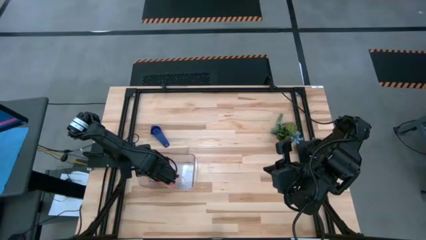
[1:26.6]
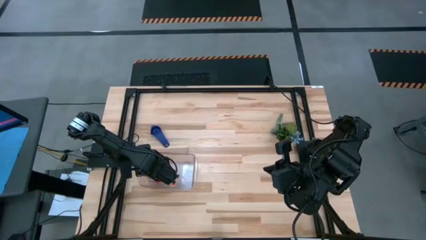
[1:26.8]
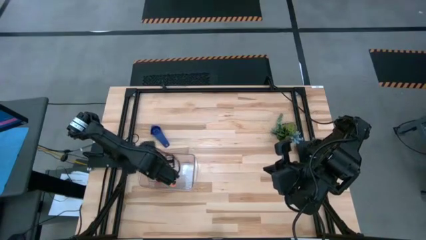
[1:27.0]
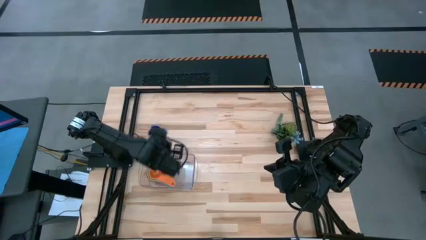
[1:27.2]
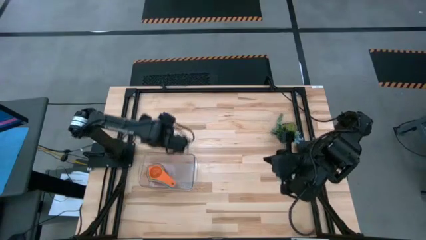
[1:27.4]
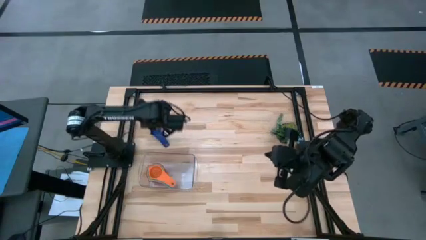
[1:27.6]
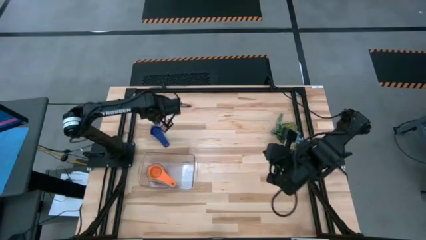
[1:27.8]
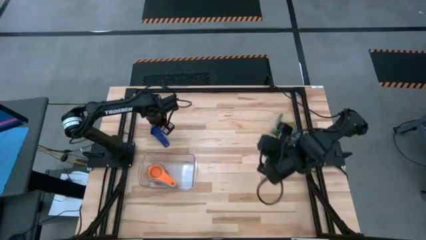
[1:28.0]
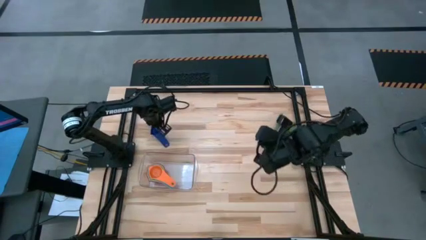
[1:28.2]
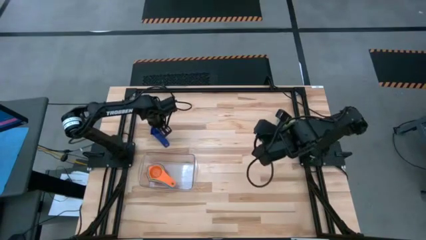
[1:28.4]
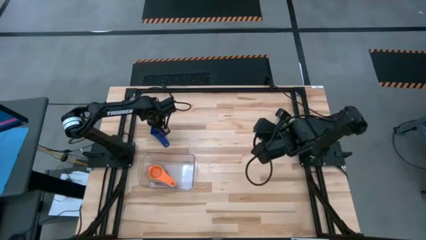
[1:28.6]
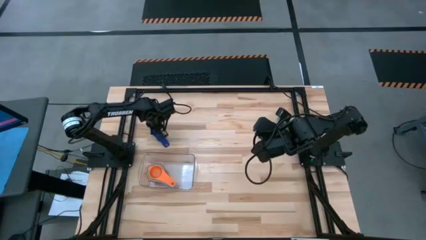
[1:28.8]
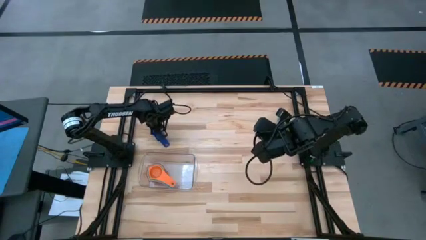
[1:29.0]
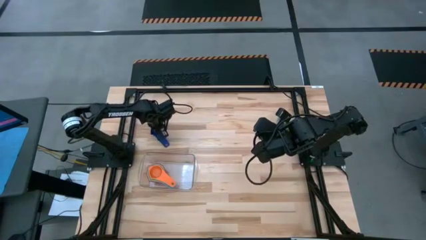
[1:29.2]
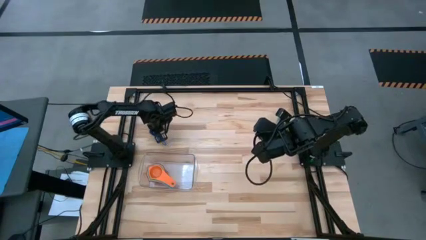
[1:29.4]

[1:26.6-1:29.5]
Task: Nest measuring cups in basket
Stack the dark blue measuring cup on the orange measuring cup in the transparent bin

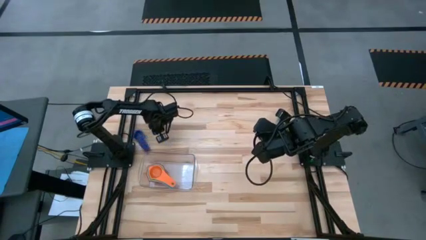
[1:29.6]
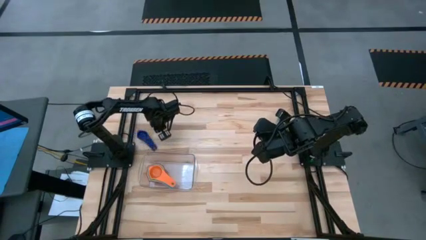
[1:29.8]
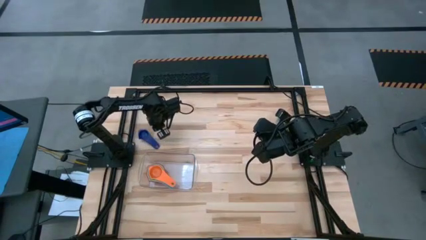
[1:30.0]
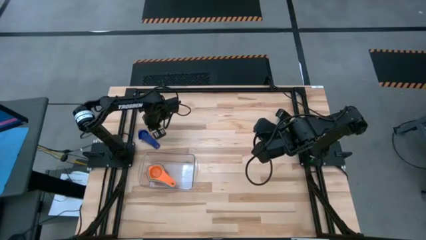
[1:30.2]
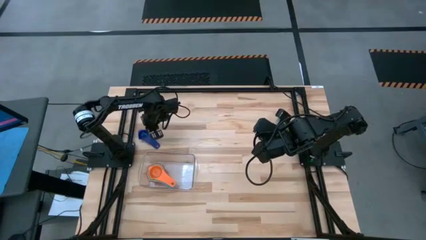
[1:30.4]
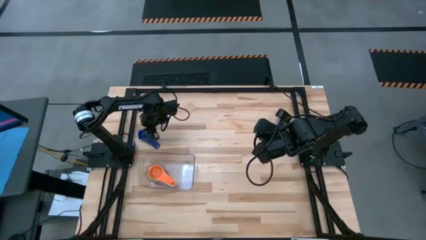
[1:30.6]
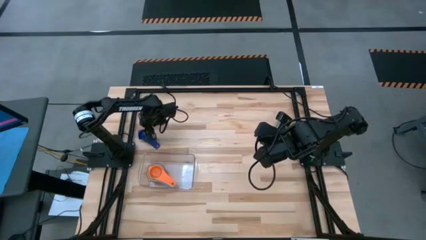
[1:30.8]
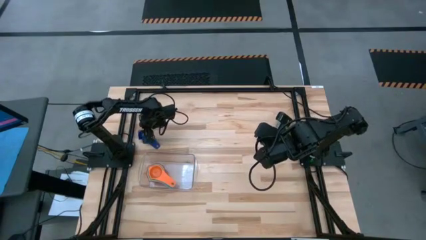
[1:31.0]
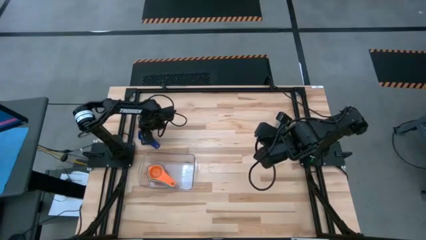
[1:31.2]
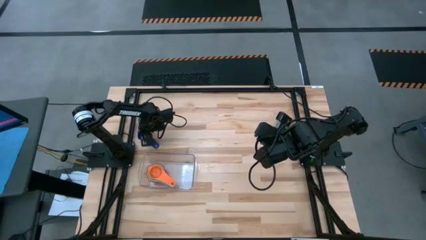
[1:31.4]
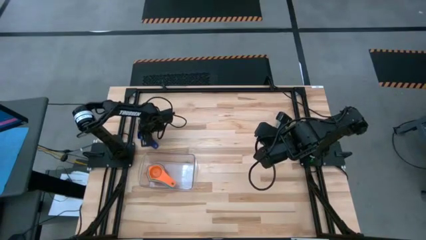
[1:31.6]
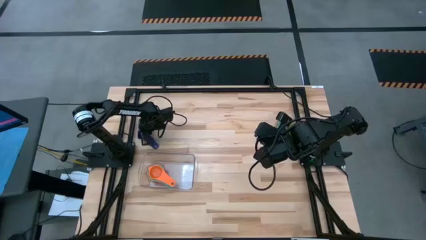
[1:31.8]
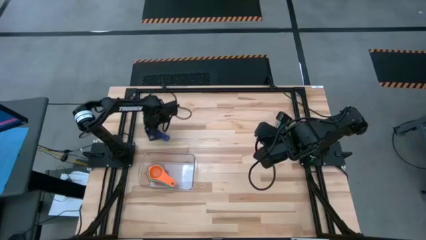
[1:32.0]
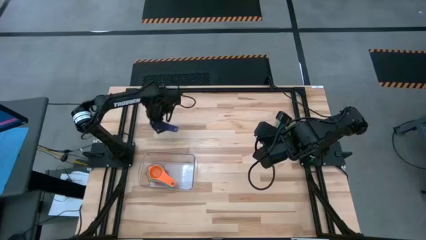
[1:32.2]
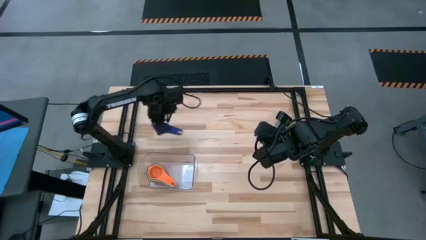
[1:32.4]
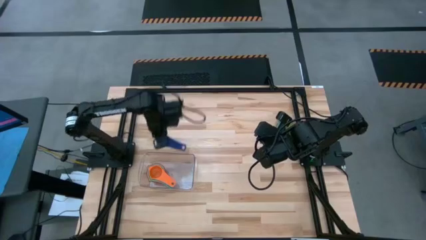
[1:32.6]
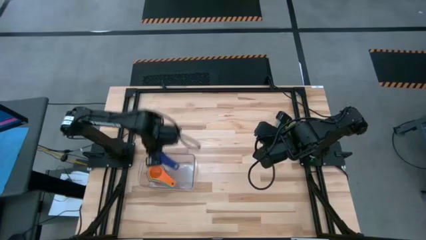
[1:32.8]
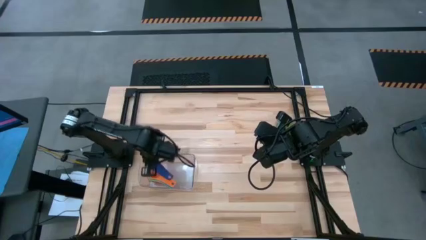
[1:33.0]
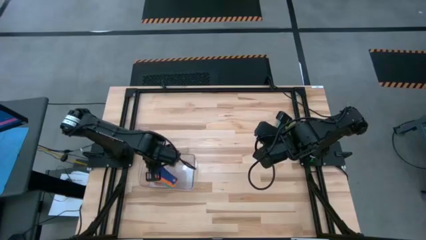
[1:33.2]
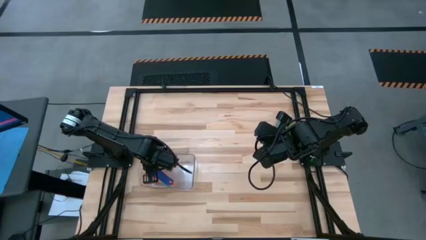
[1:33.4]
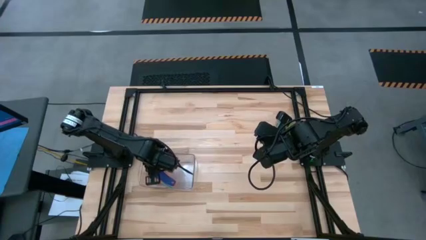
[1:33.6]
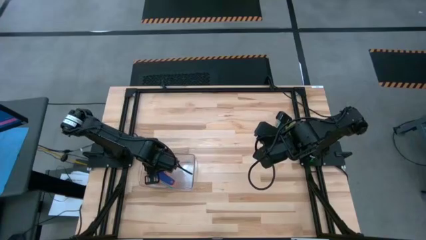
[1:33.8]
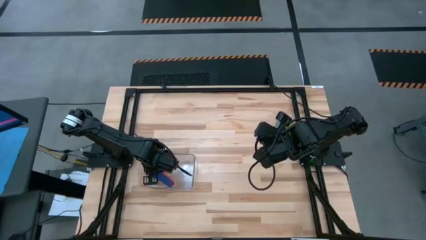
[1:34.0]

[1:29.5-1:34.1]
Stack the dark blue measuring cup on the orange measuring cup in the transparent bin

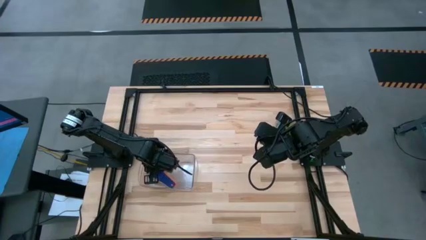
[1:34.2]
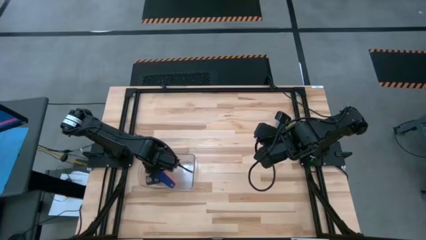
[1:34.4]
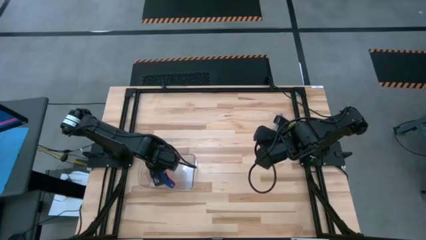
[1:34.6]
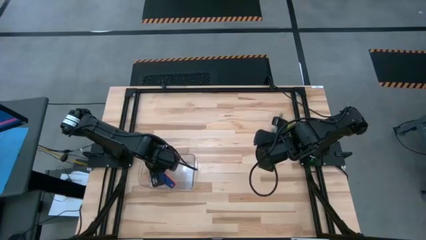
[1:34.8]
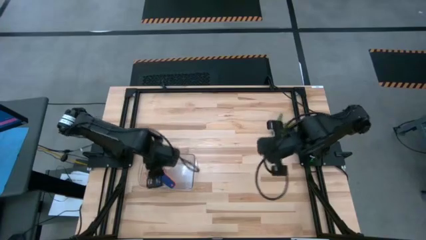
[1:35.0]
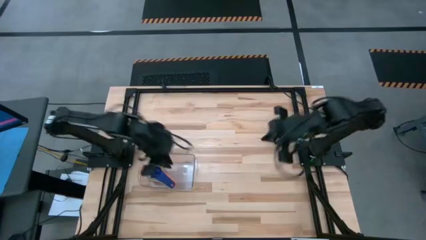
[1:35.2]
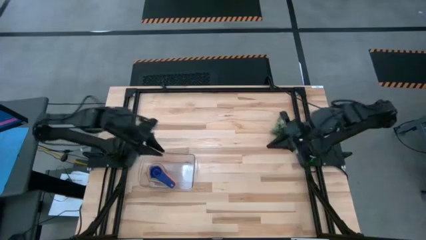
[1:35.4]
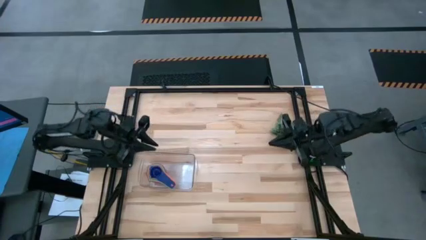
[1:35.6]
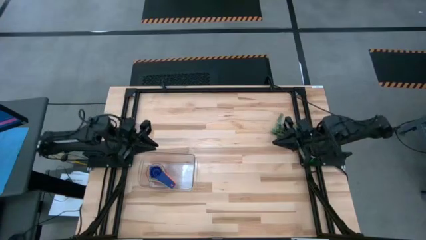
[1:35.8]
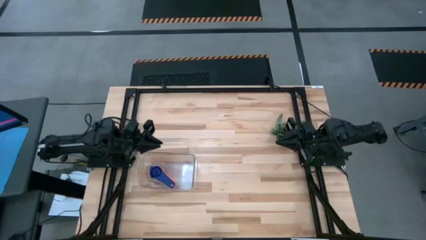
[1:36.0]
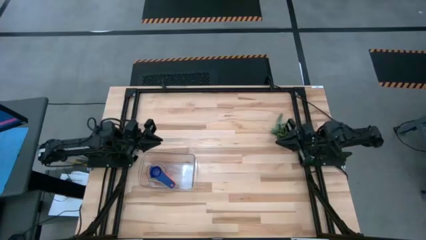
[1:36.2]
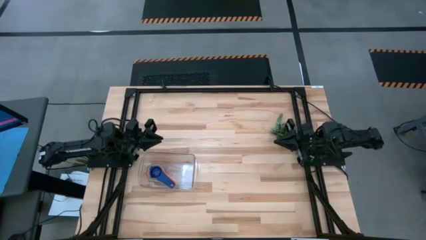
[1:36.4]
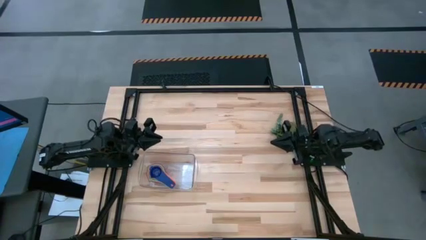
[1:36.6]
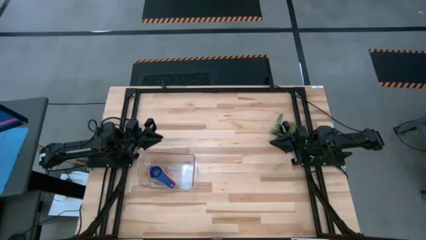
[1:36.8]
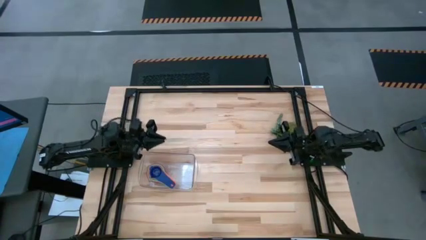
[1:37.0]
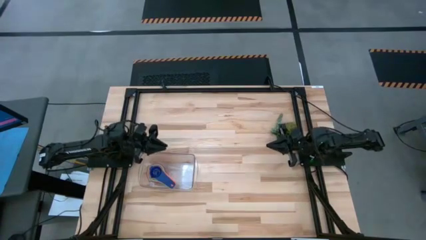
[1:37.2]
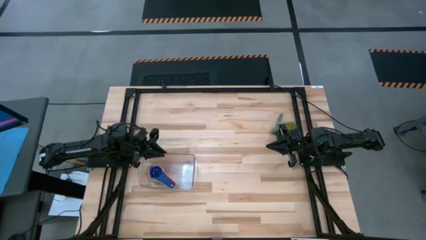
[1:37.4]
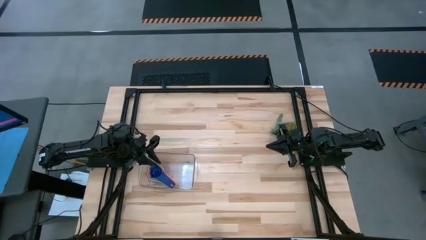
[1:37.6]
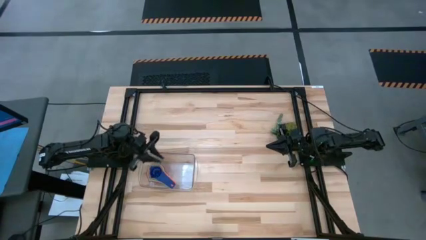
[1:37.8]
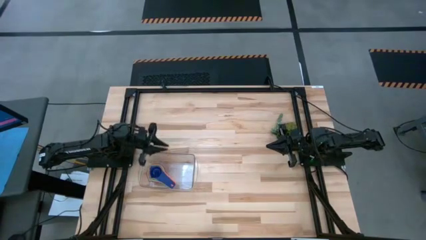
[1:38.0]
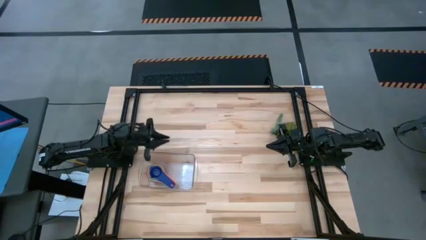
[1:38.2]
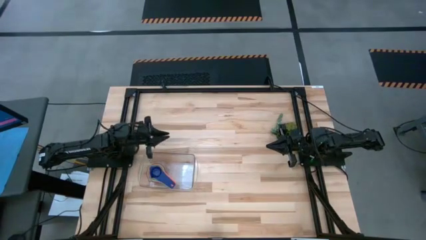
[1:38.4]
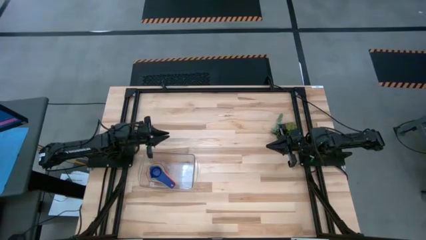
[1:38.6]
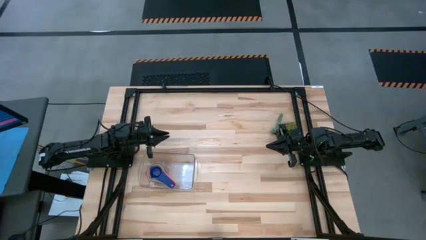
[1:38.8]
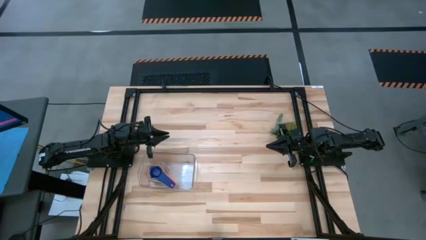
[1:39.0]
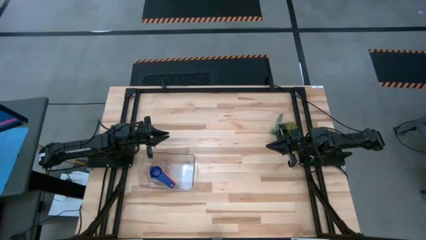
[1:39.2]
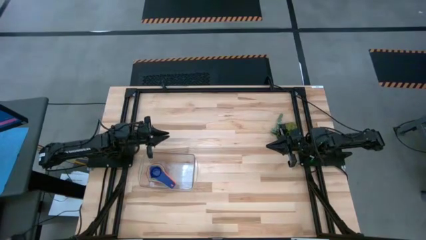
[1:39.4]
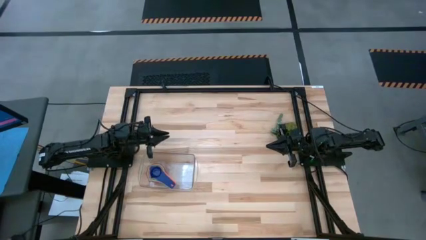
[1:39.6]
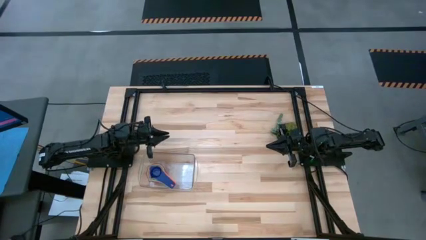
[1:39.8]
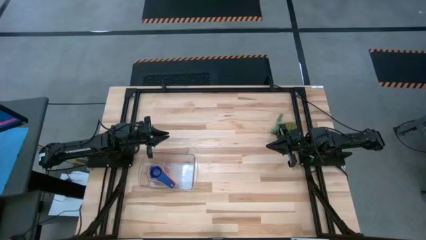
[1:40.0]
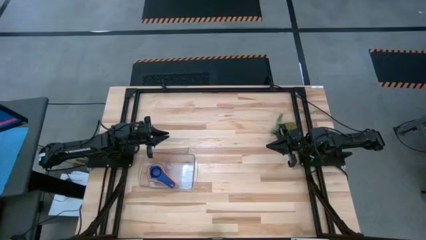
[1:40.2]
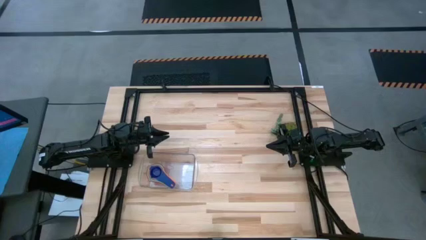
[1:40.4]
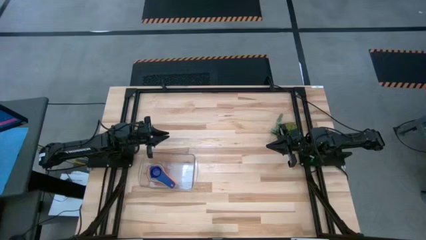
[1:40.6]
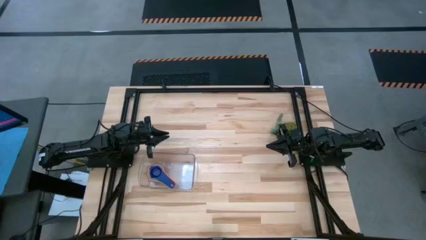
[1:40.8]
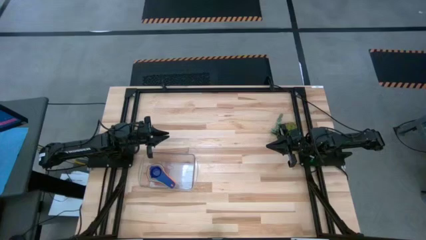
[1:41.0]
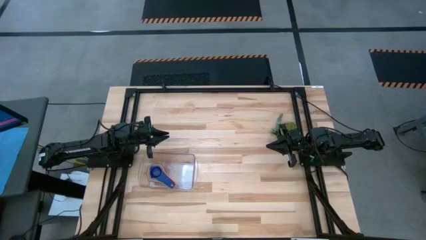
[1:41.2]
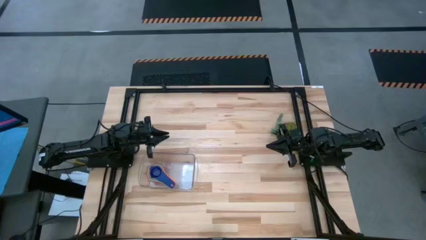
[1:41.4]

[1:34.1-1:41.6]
Return to Home Position
